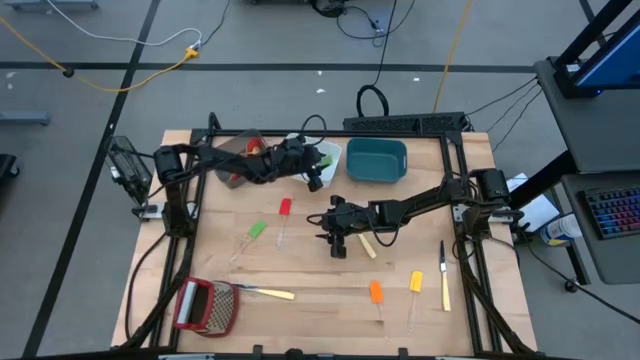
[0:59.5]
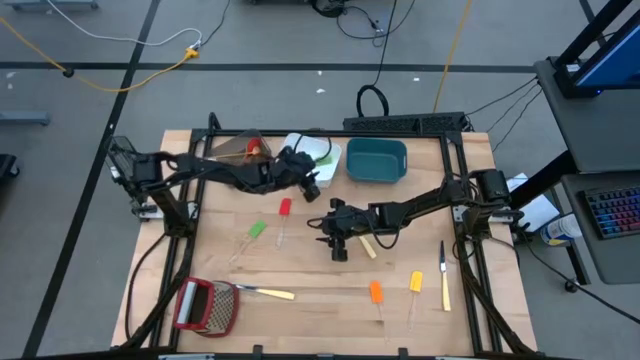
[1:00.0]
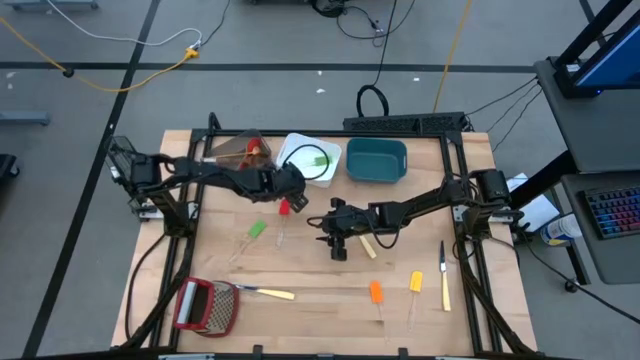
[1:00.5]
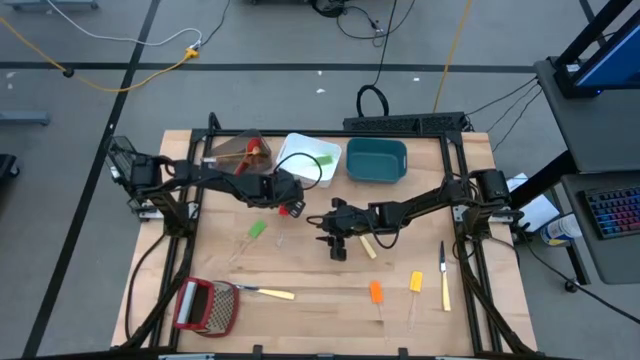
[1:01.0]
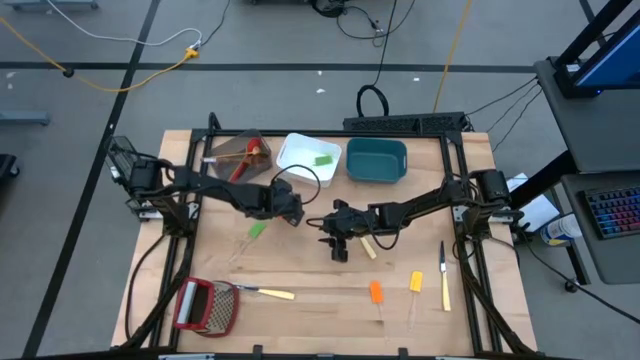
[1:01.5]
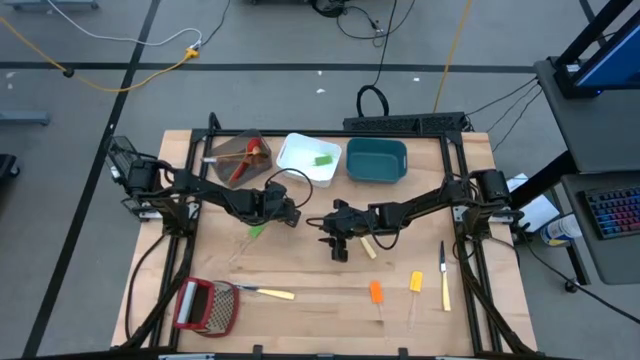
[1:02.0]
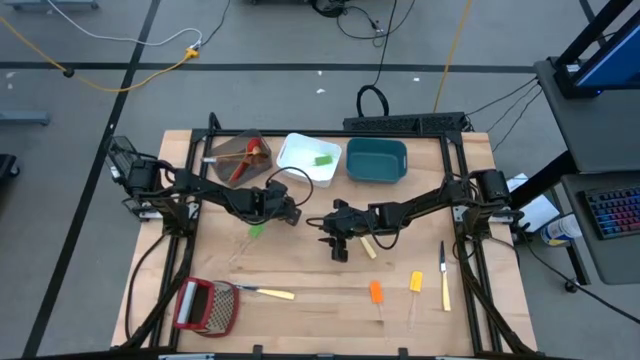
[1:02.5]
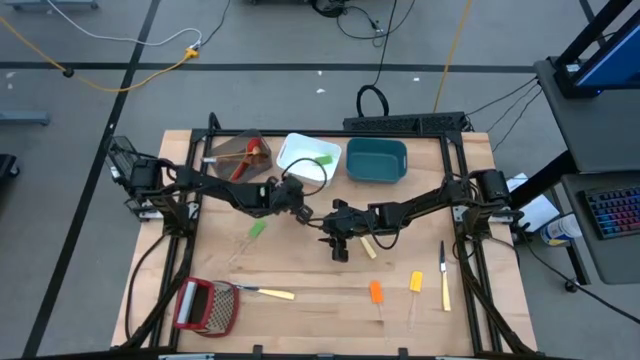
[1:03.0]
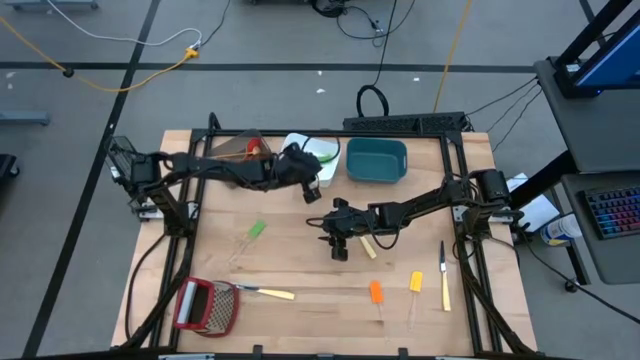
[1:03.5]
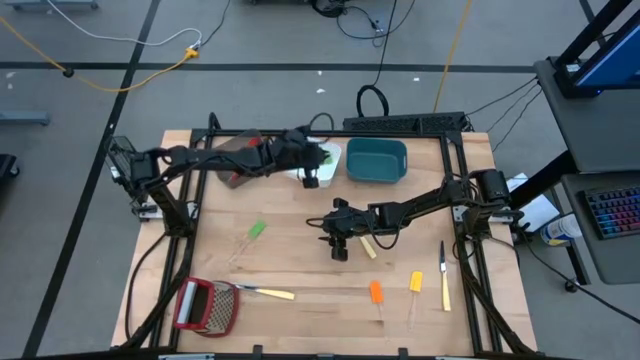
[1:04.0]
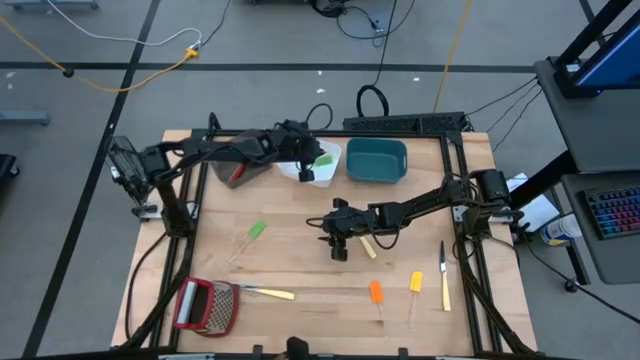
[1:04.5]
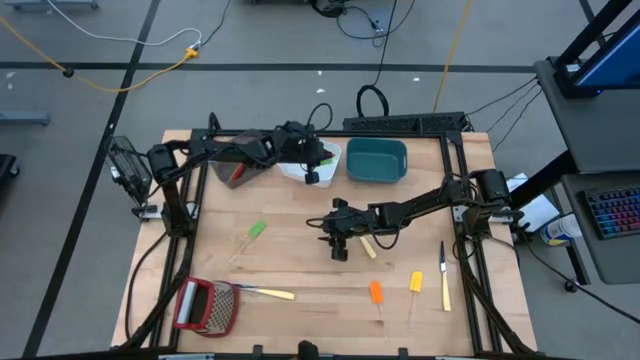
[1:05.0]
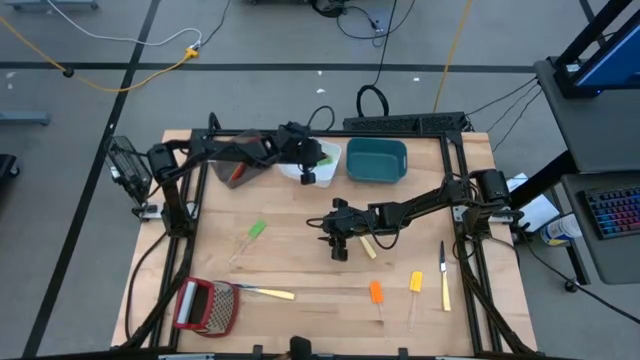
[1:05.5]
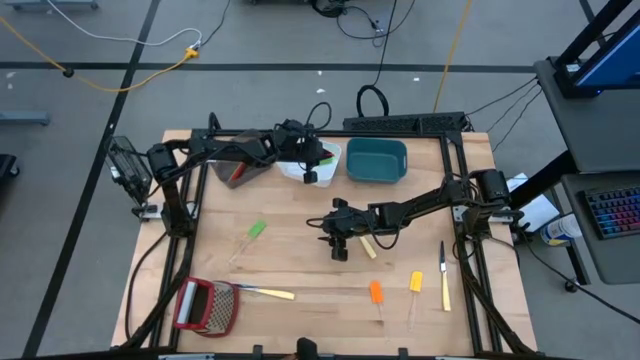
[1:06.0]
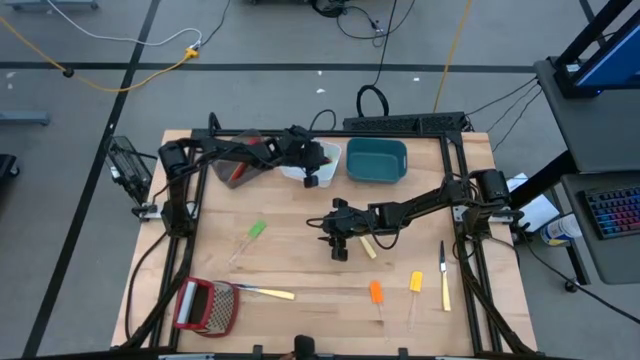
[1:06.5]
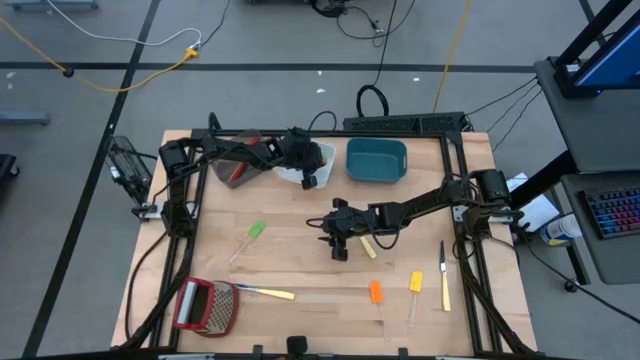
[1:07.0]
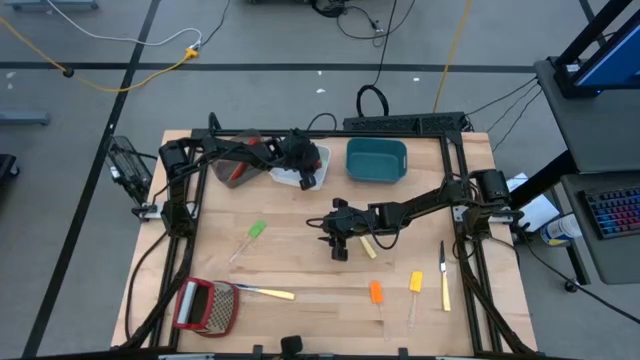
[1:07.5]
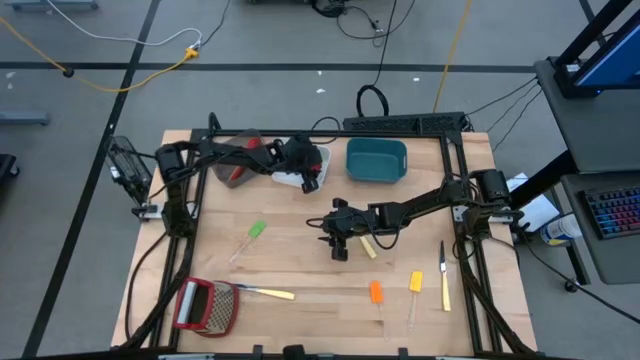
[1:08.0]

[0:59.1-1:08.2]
Task: Pick & Place Kitchen Items
Put the red spatula into the white bin

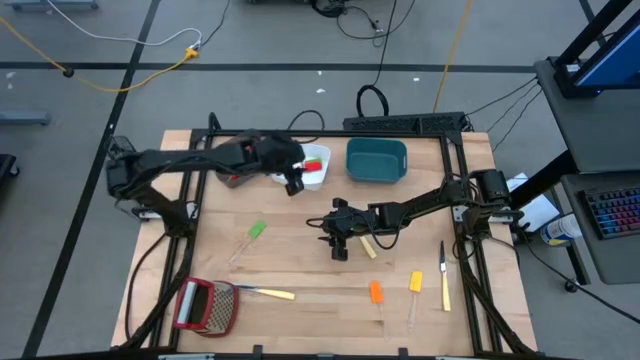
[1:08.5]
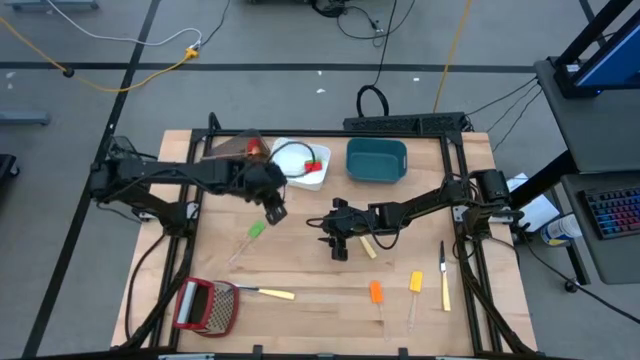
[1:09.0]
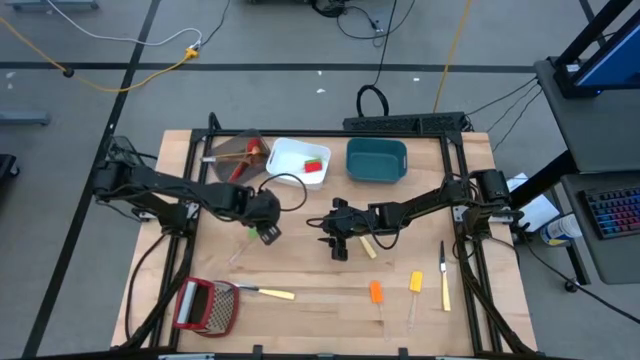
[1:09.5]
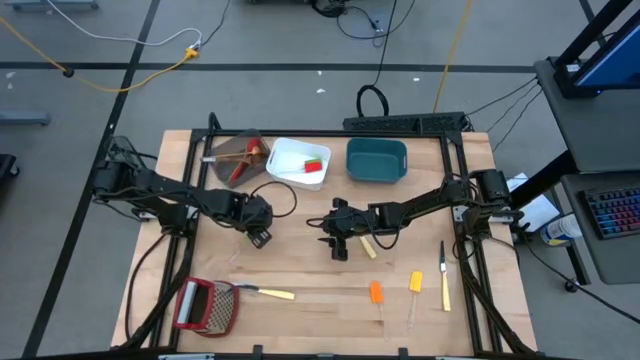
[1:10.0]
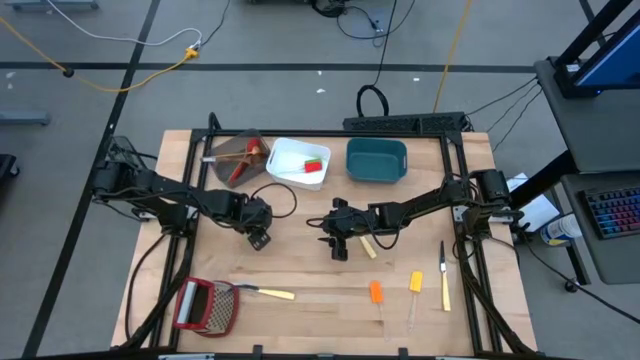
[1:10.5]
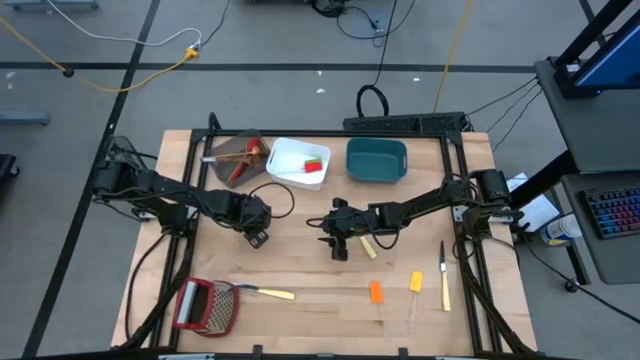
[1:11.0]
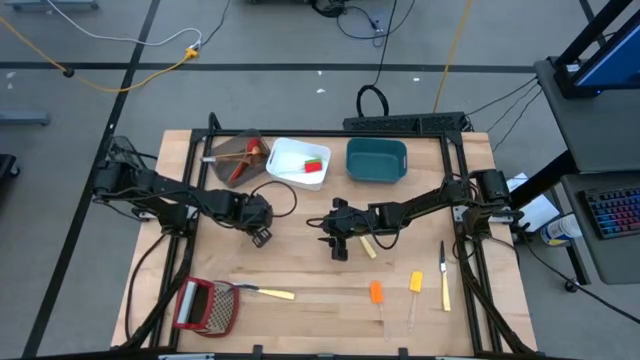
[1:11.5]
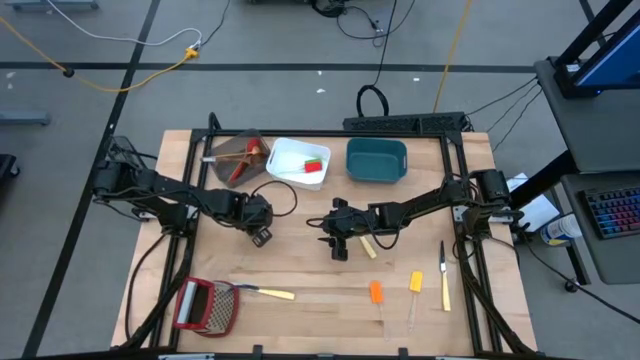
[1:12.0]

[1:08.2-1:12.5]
Put the green spatula into the white bin

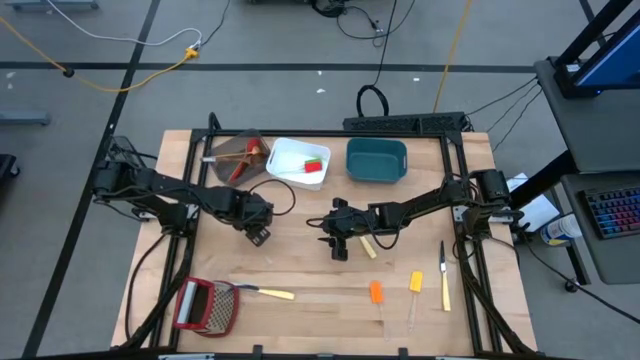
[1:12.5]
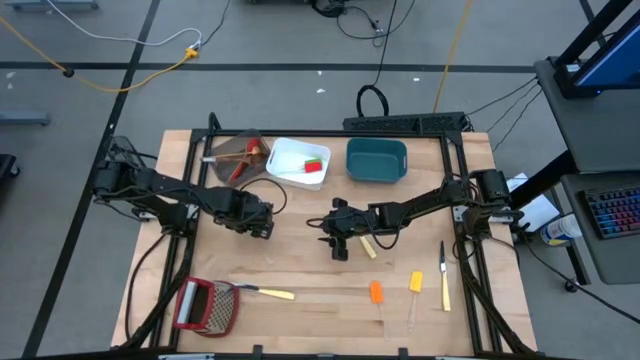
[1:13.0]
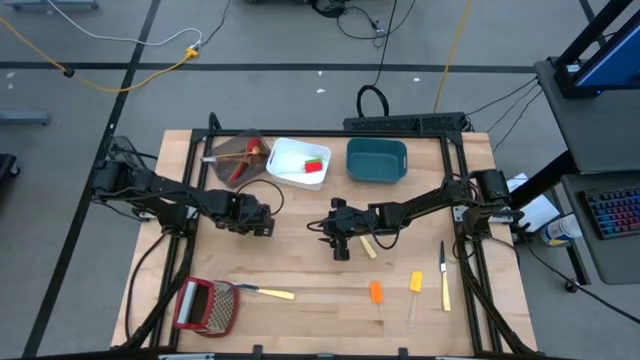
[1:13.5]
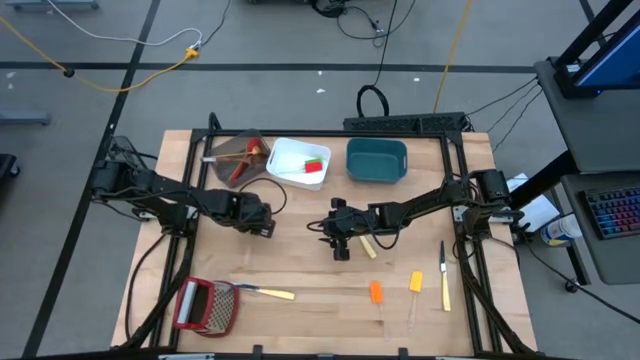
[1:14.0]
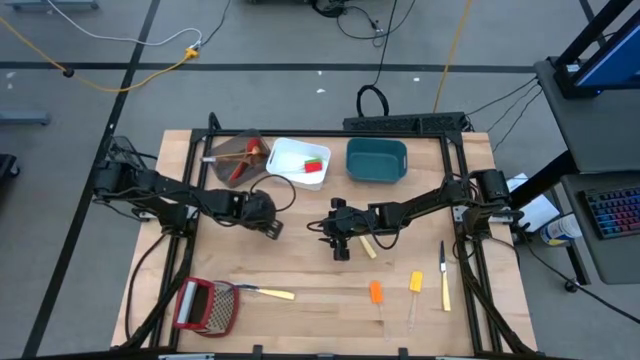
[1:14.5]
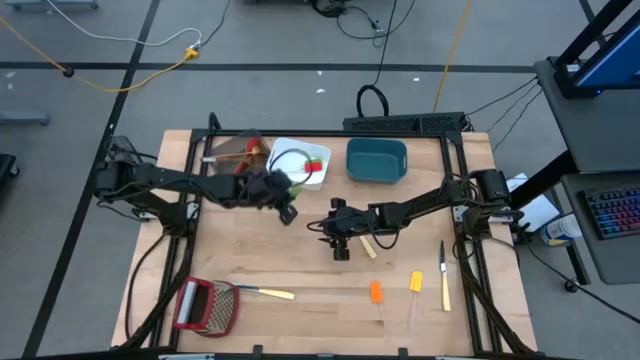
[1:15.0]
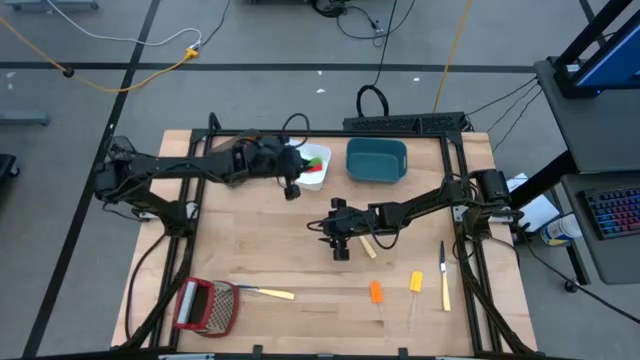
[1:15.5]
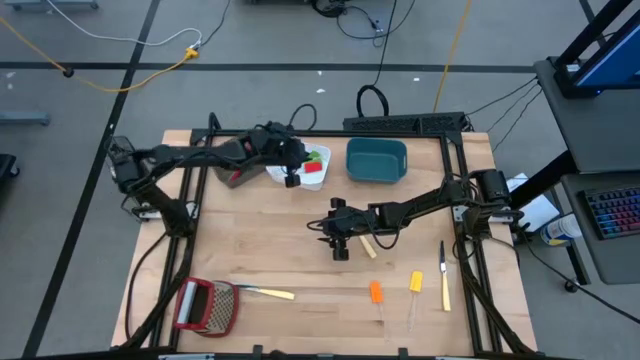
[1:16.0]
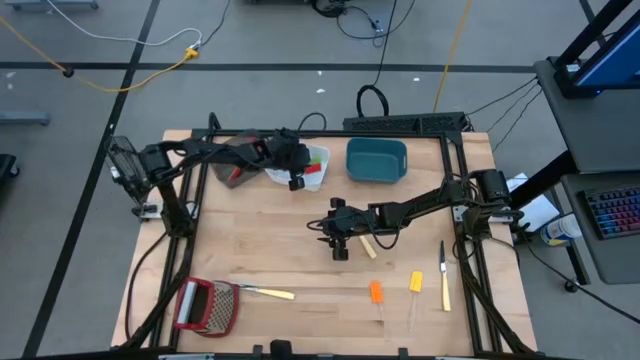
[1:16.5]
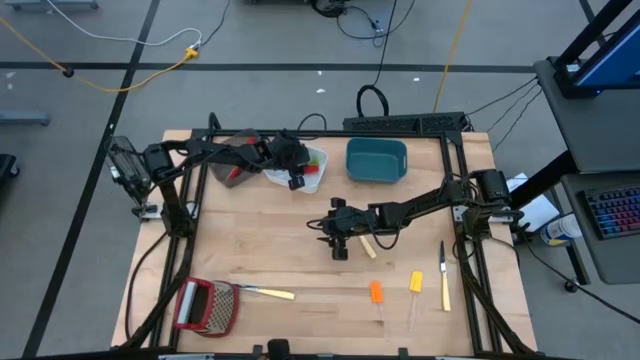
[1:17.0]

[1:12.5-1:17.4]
Put the green spatula into the white bin

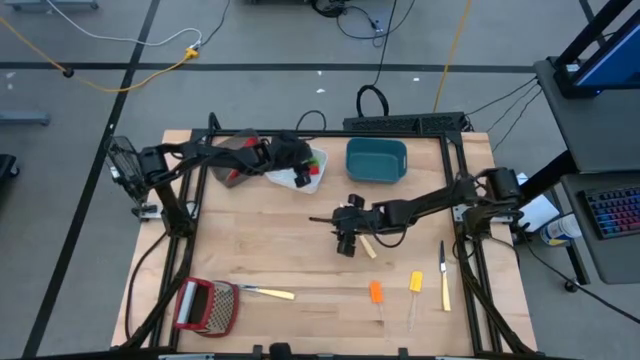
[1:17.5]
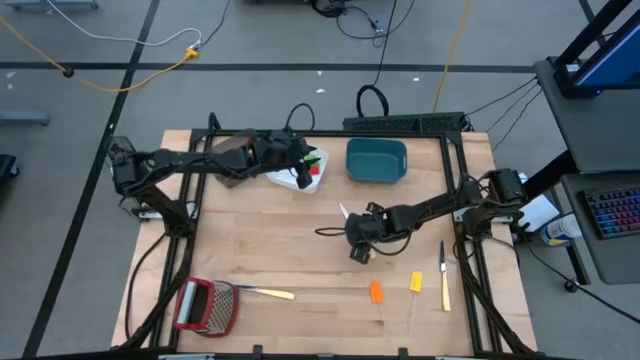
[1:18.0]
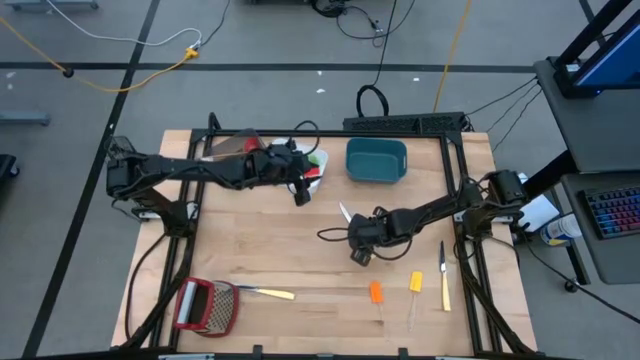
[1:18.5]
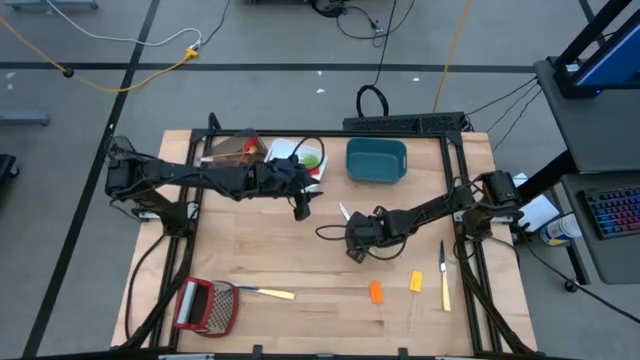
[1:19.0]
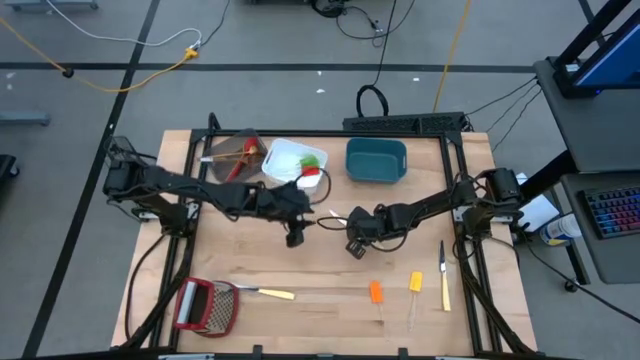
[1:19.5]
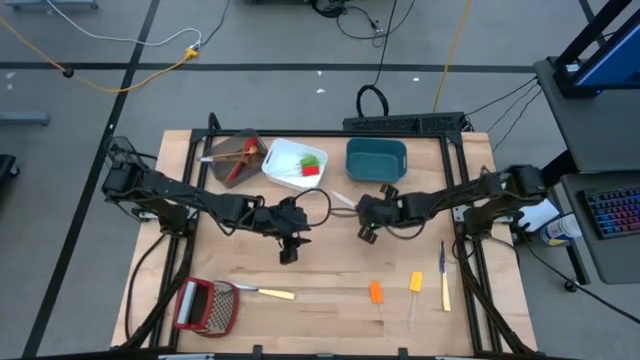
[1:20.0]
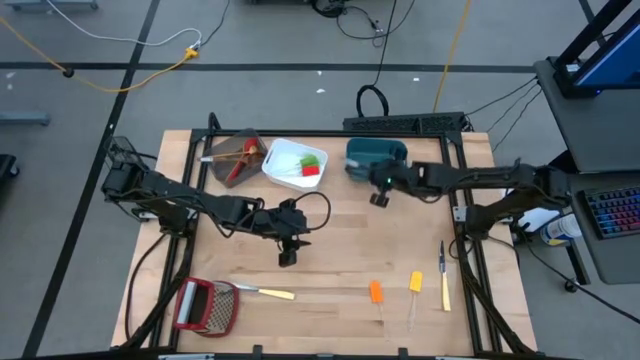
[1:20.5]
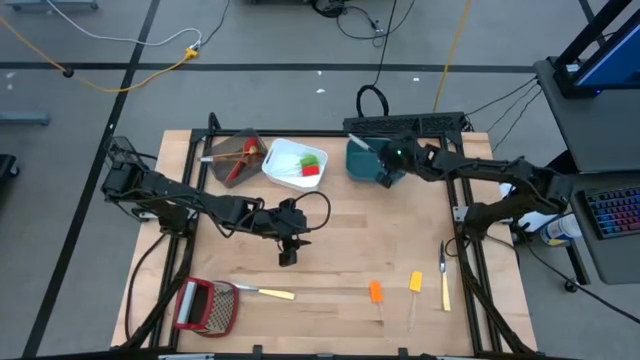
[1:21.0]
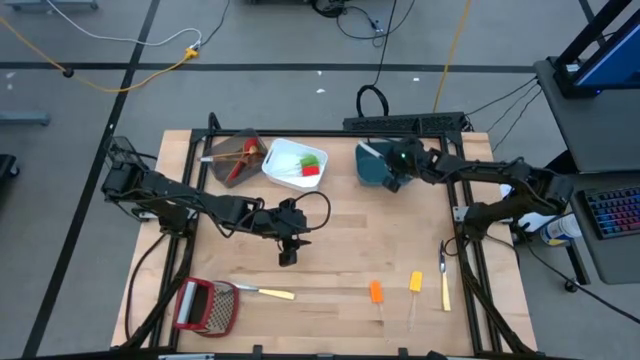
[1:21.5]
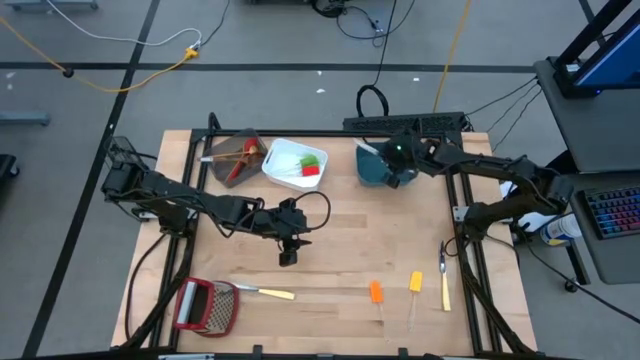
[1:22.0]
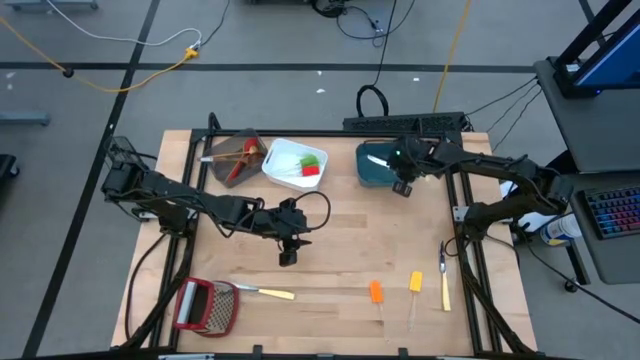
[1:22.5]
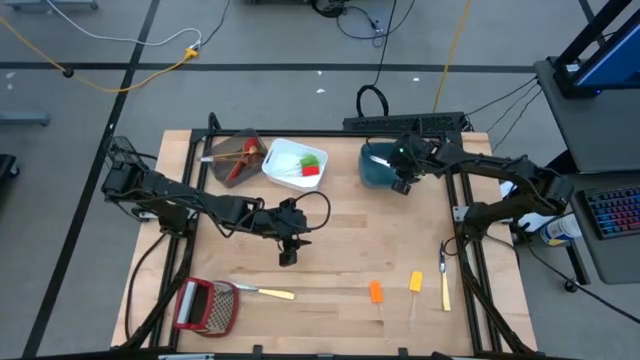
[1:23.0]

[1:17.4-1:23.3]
Put the top yellow knife into the blue bin
